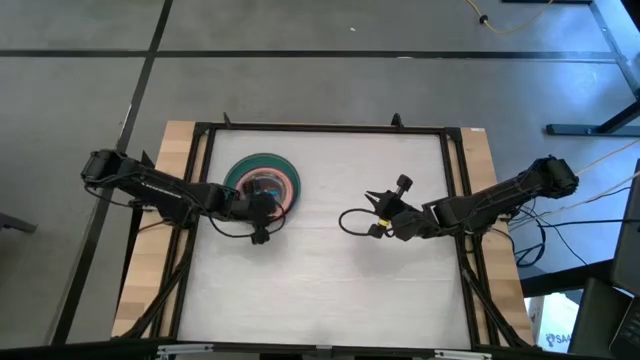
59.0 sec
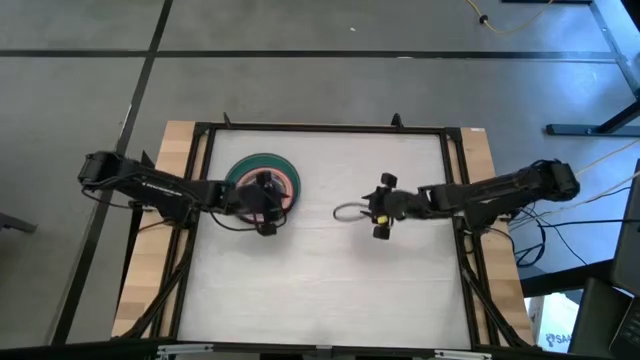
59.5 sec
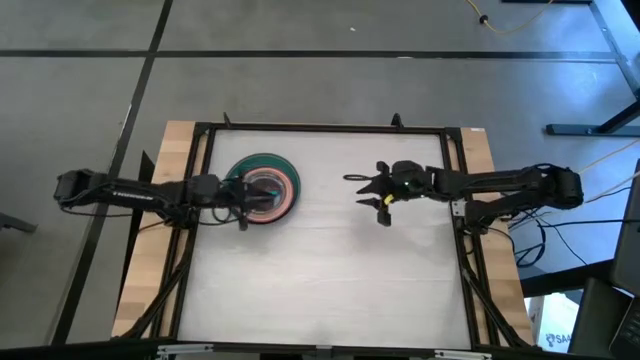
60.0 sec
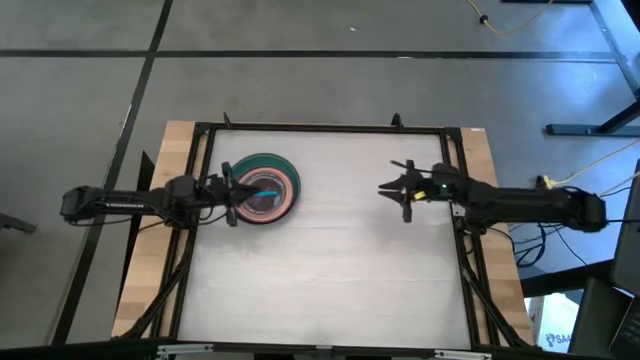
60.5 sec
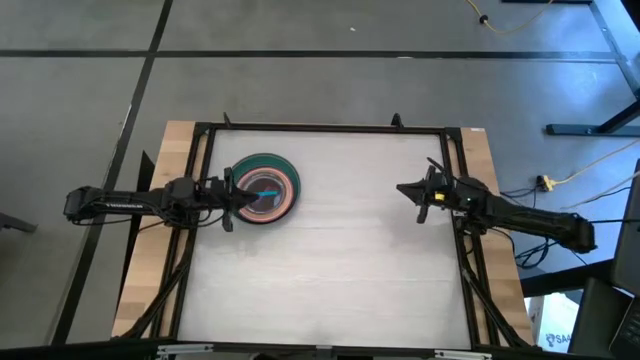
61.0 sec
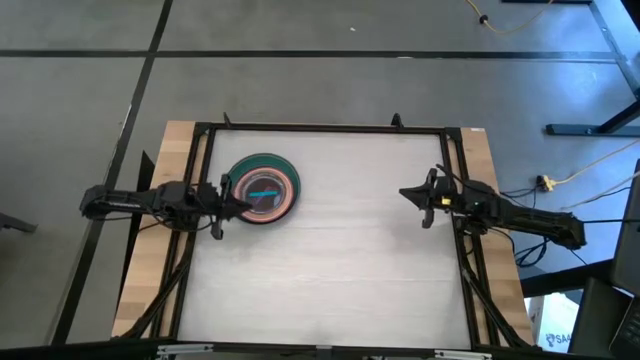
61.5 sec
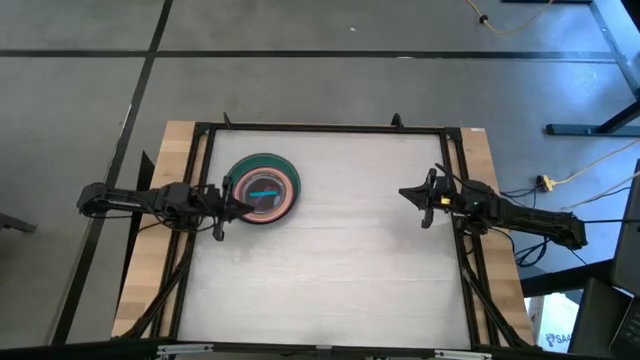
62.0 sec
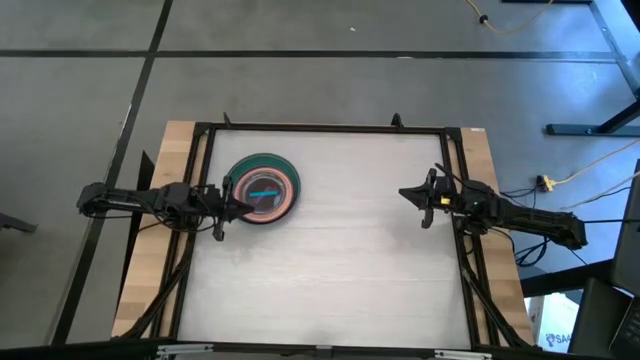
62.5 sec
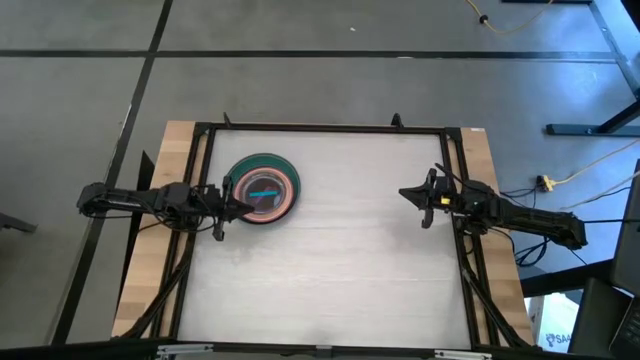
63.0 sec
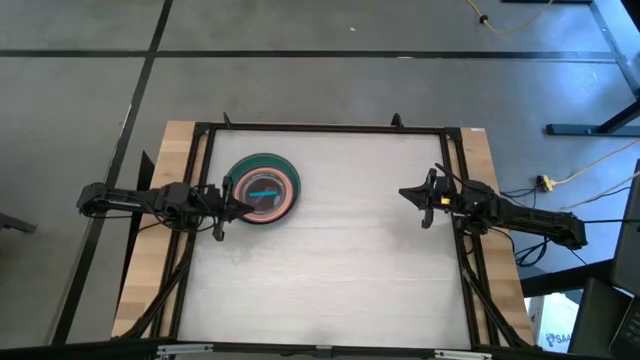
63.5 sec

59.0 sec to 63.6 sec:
Task: Stack plastic plates
Return to Home Position

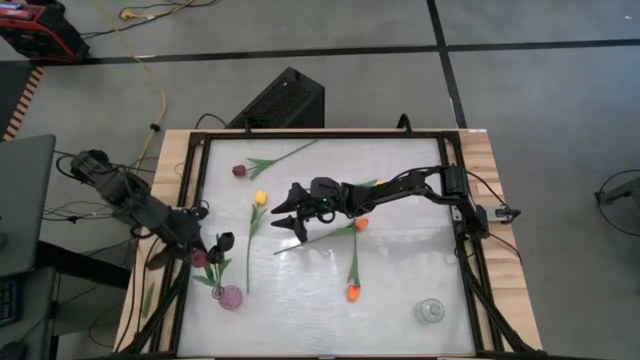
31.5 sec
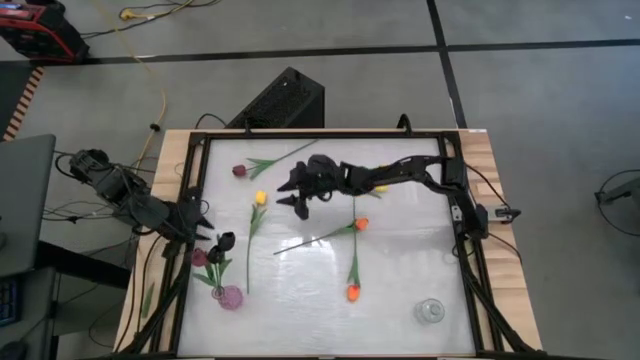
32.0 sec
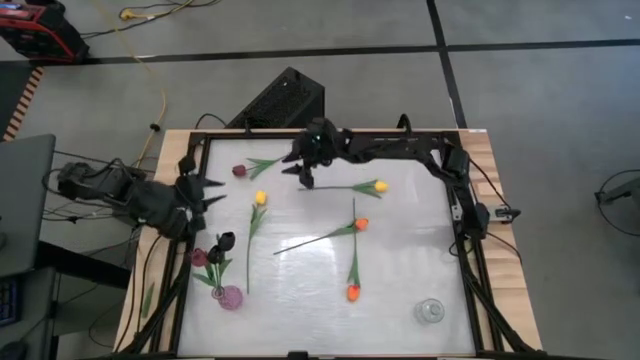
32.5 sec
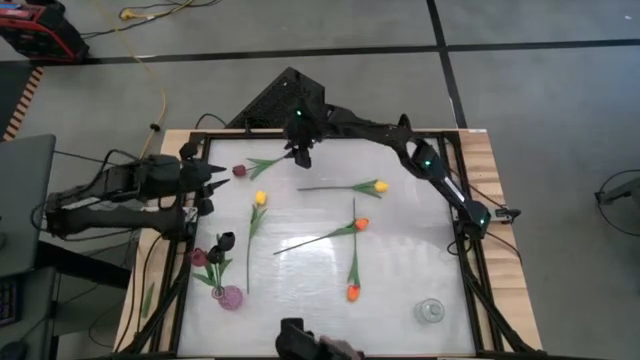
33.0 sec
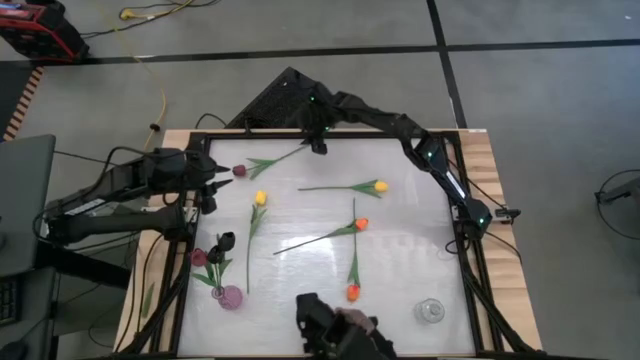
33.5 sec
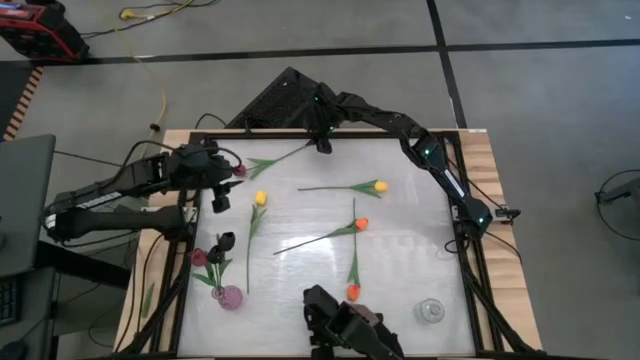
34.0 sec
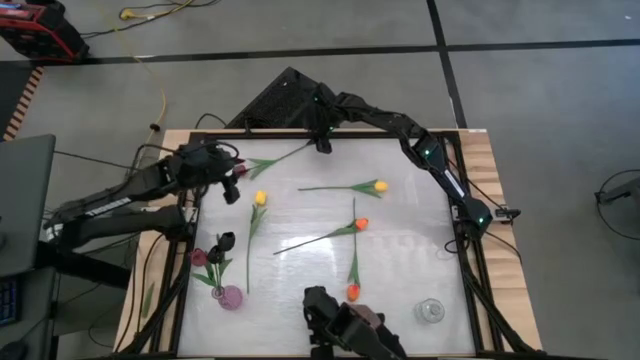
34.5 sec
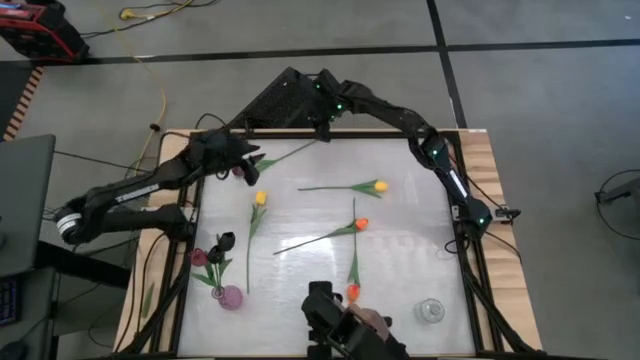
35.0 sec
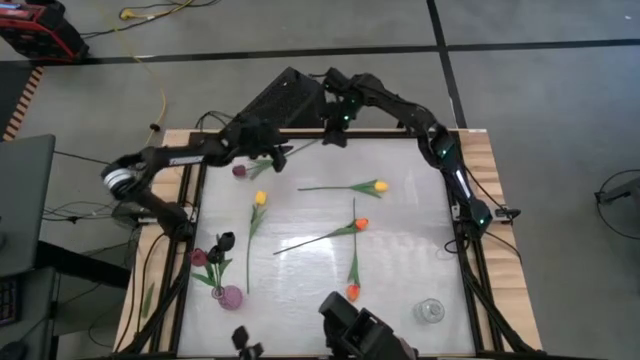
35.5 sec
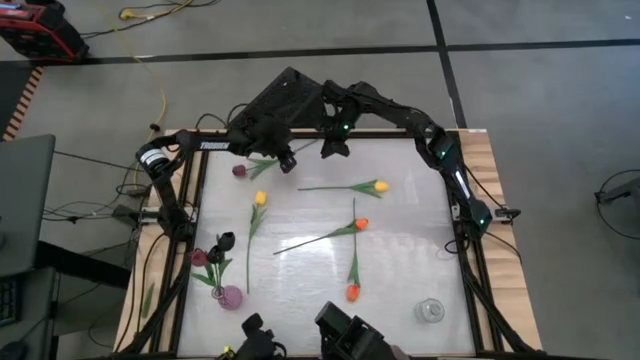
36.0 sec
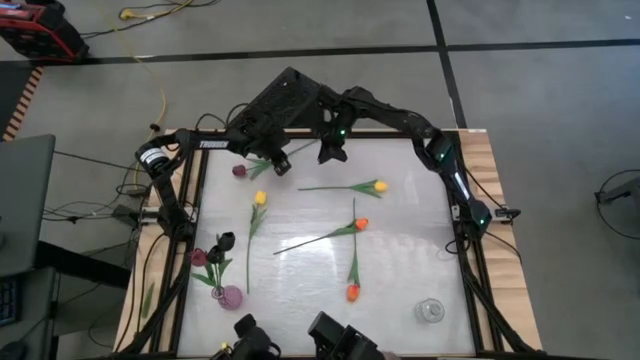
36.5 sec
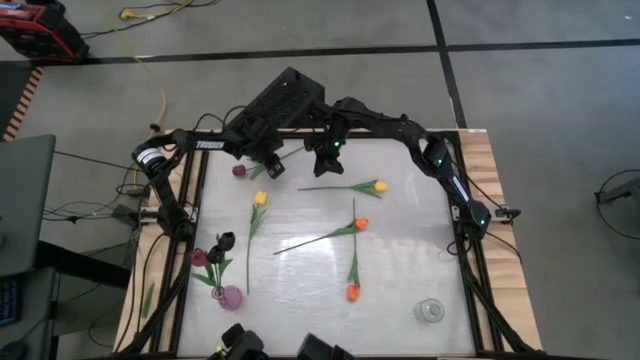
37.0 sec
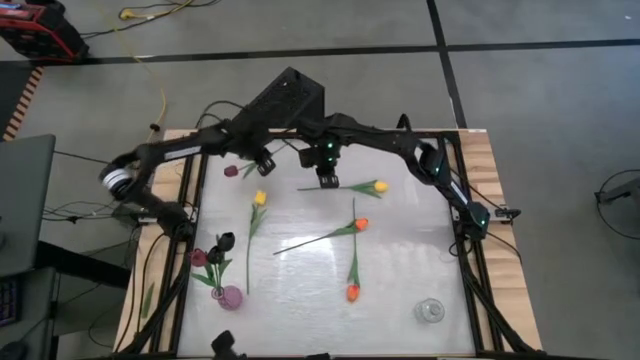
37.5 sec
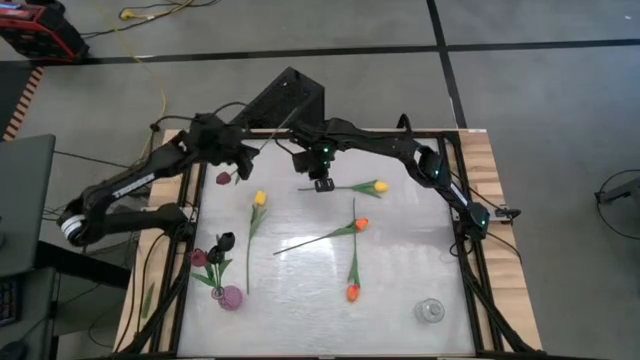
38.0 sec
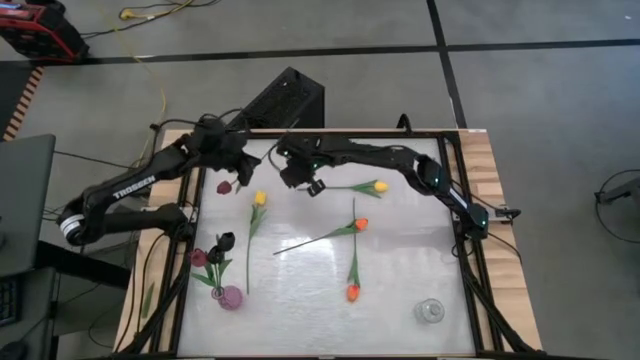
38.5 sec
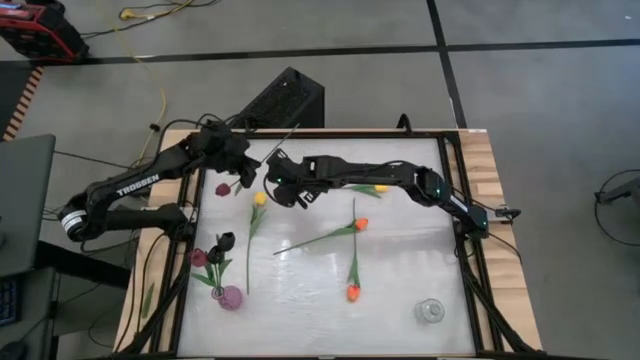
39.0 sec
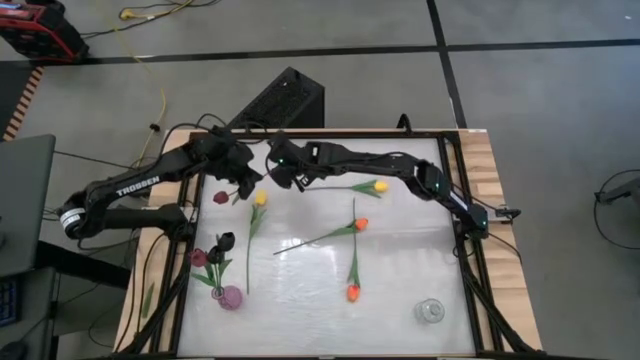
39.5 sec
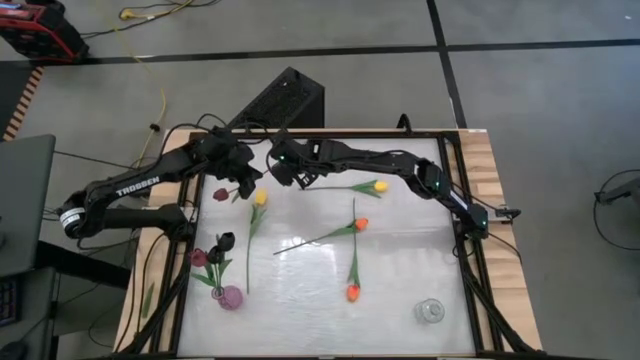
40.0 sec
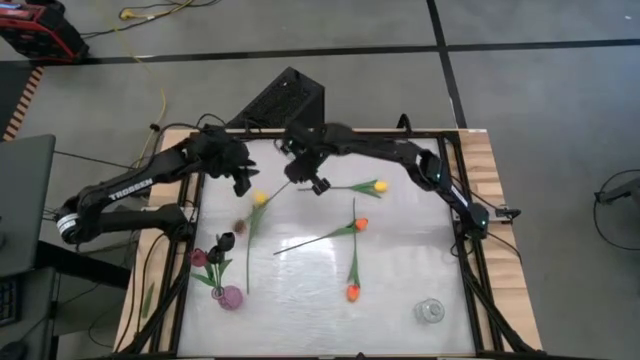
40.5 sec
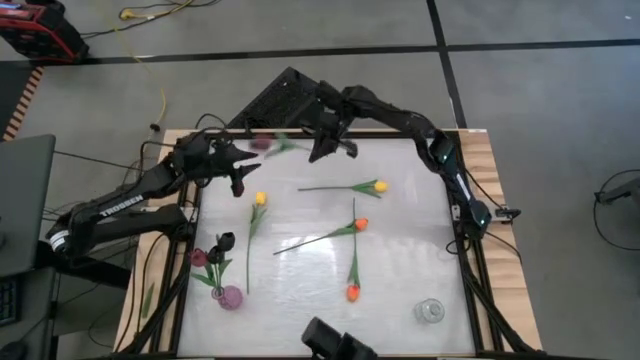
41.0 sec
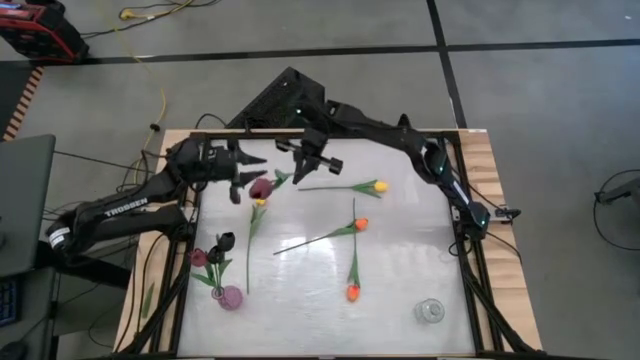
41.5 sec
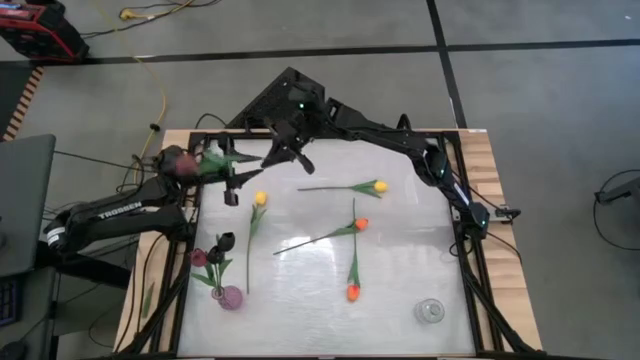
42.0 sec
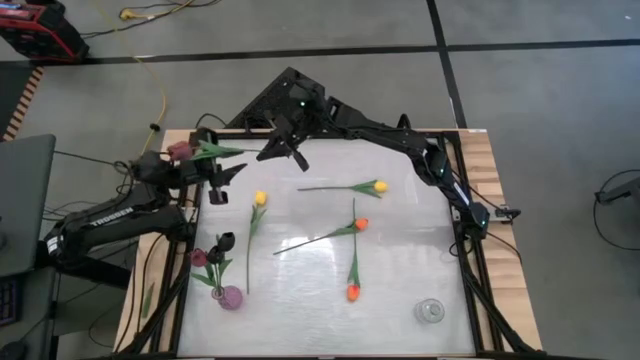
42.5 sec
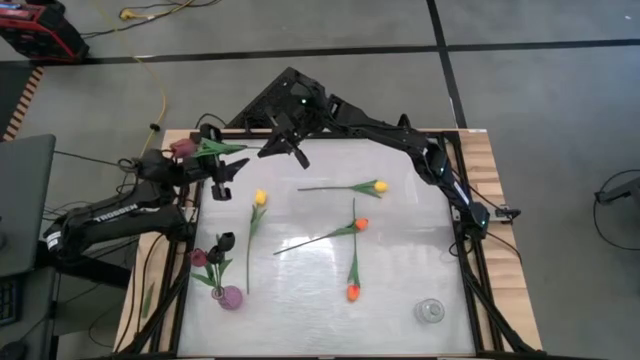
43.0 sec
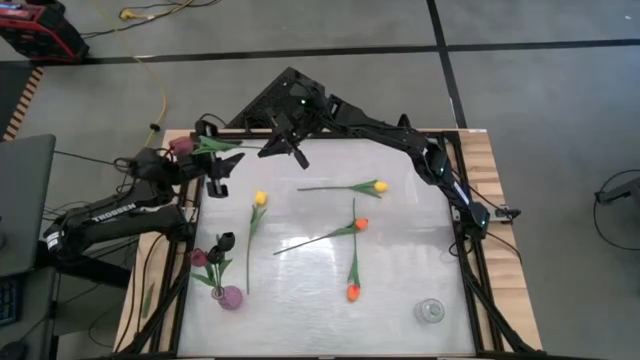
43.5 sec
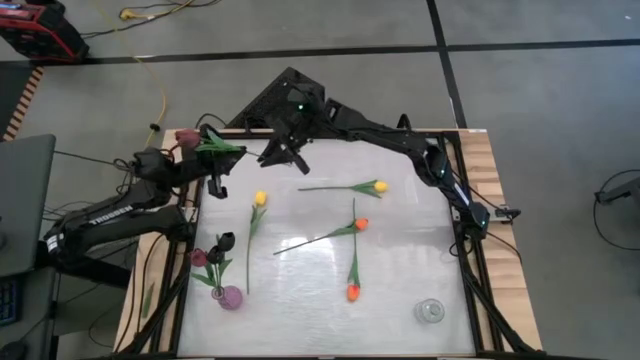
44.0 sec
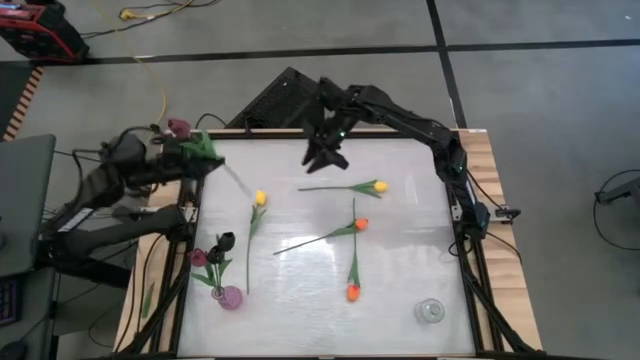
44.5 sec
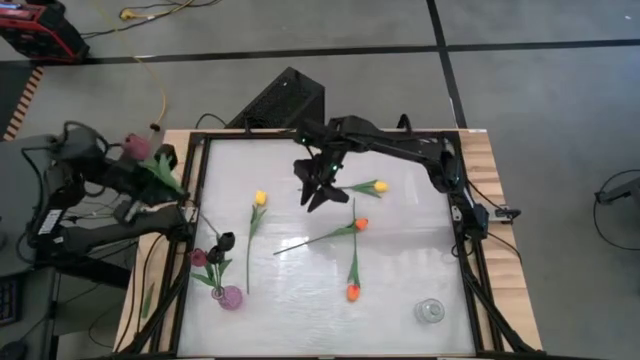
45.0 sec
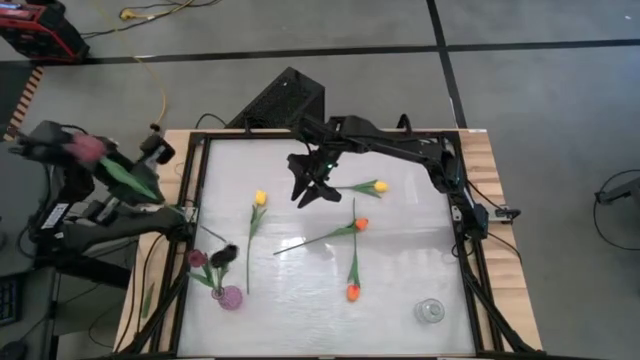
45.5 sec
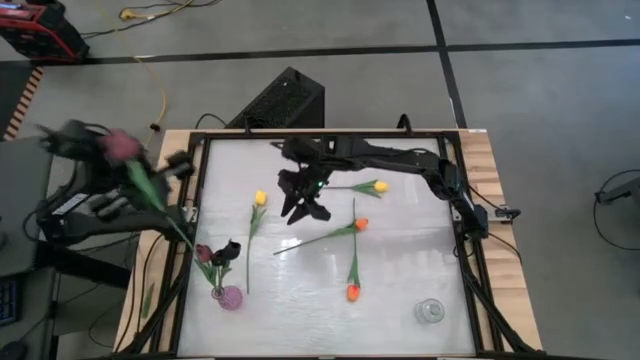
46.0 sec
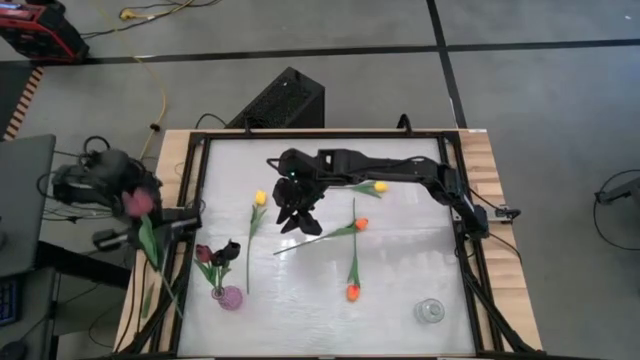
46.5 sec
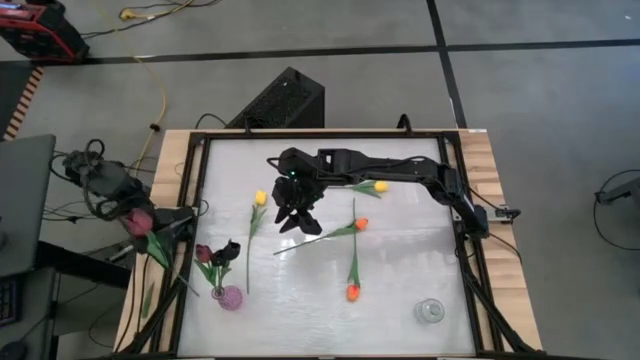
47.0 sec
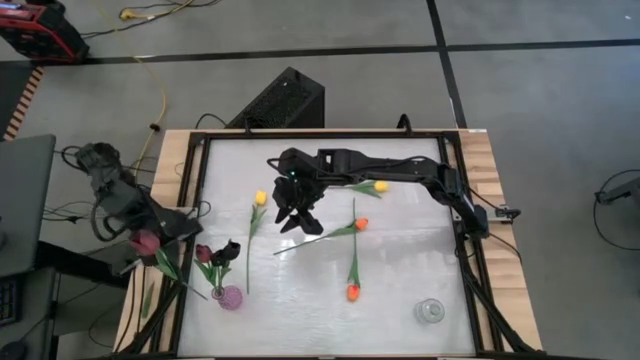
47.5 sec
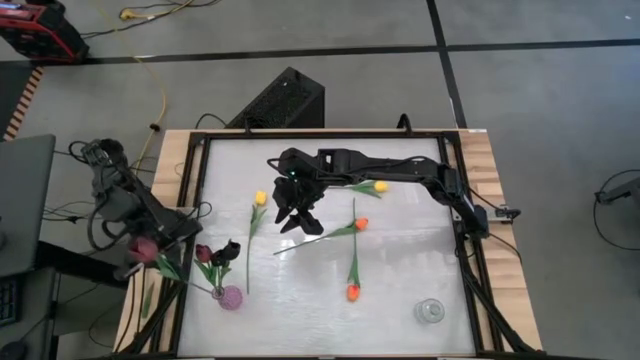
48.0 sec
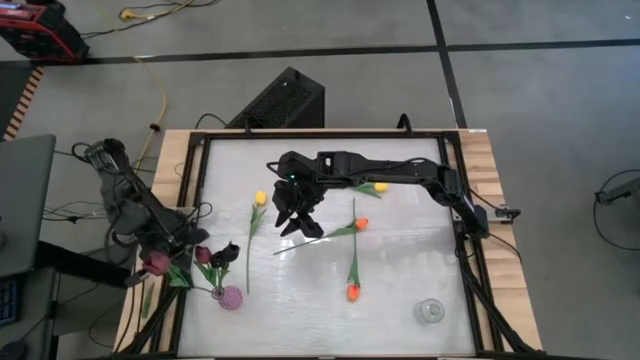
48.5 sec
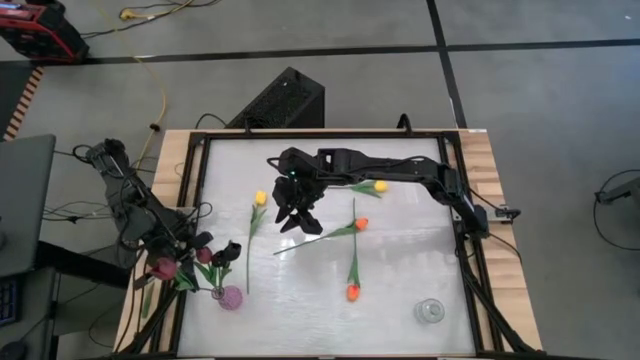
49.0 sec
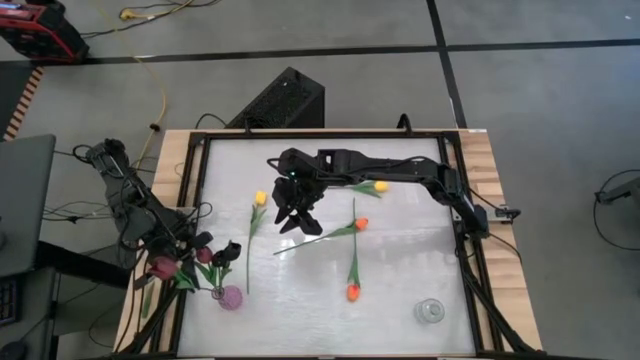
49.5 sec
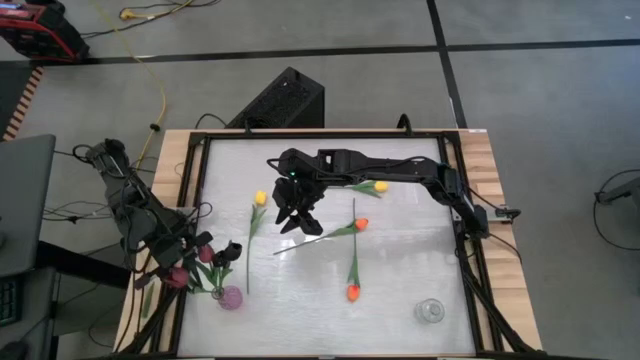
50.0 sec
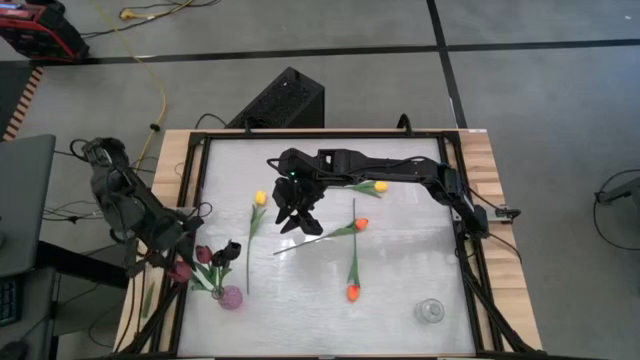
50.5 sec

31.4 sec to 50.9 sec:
Task: Sort flowers into vase by color
Put the maroon flower into the pink flower vase
